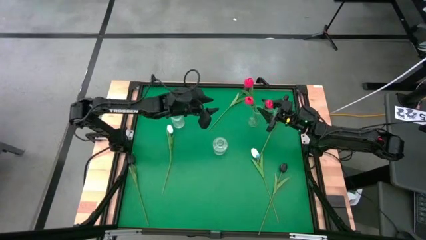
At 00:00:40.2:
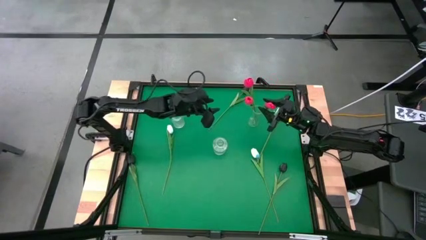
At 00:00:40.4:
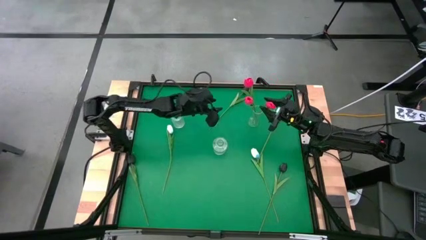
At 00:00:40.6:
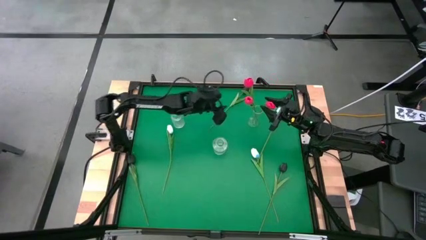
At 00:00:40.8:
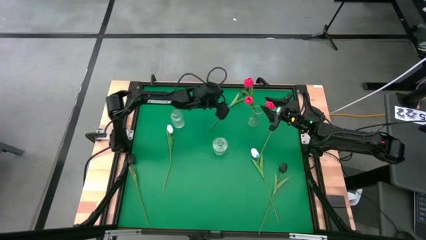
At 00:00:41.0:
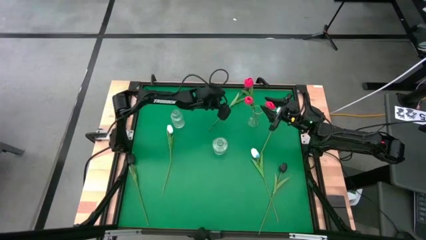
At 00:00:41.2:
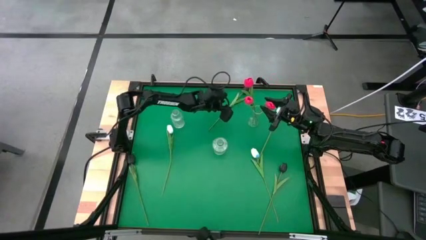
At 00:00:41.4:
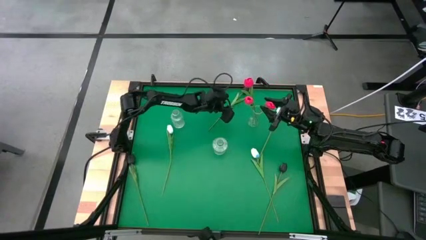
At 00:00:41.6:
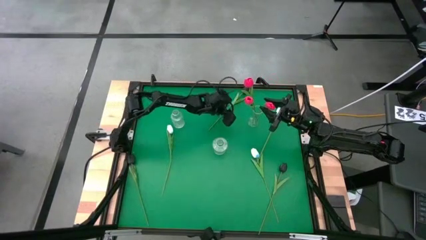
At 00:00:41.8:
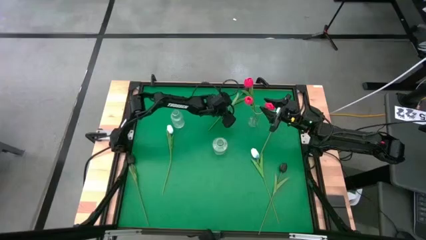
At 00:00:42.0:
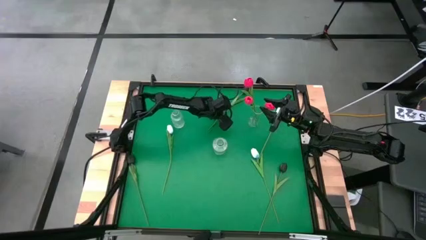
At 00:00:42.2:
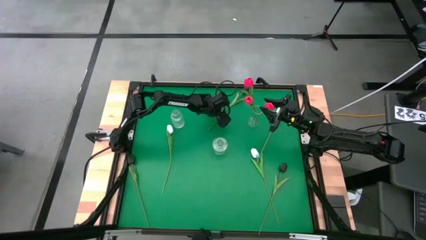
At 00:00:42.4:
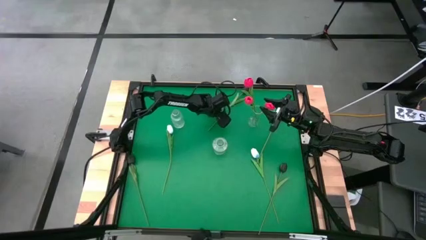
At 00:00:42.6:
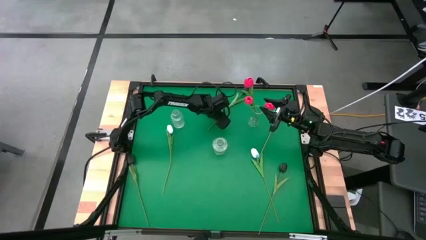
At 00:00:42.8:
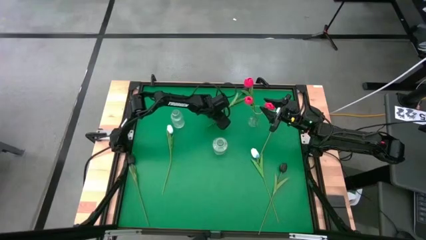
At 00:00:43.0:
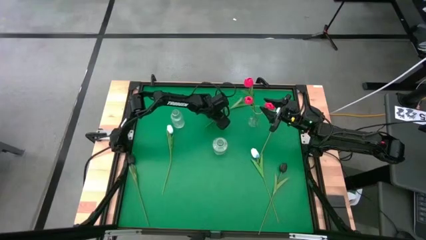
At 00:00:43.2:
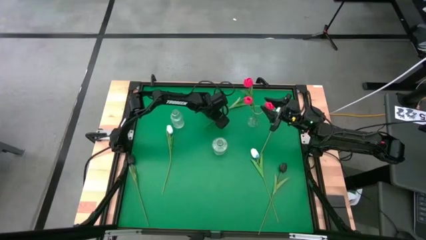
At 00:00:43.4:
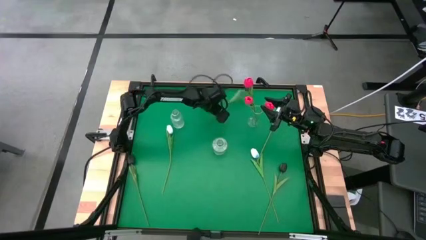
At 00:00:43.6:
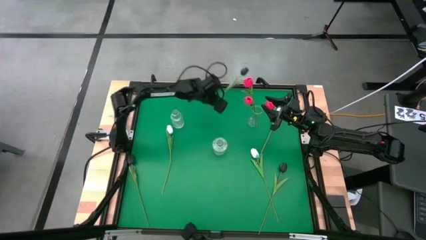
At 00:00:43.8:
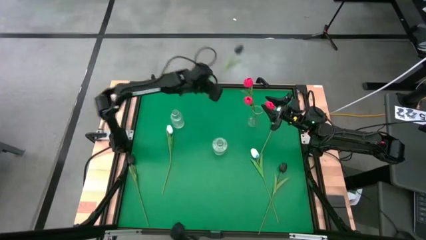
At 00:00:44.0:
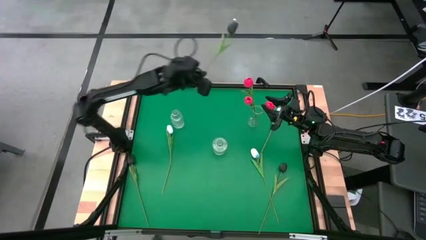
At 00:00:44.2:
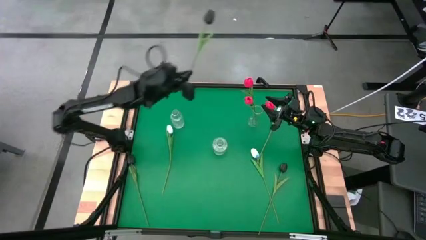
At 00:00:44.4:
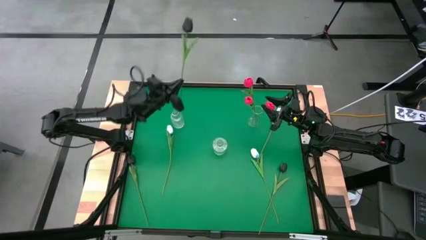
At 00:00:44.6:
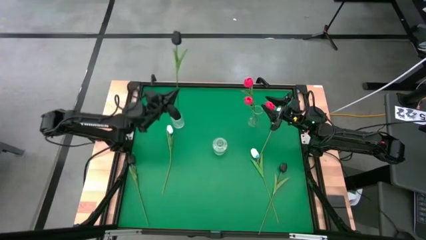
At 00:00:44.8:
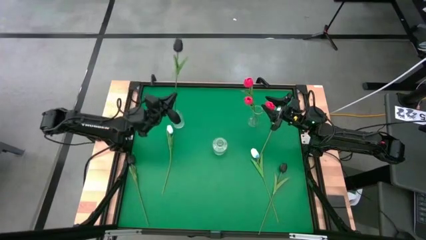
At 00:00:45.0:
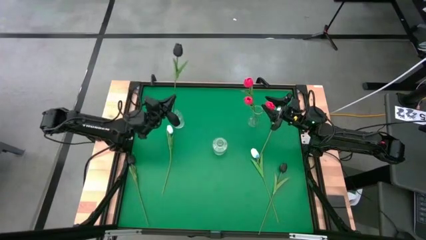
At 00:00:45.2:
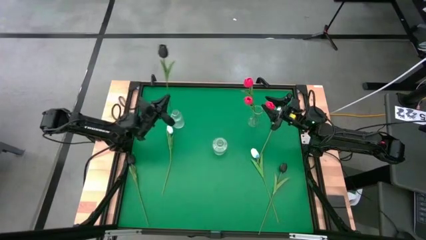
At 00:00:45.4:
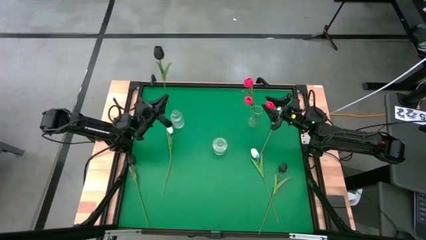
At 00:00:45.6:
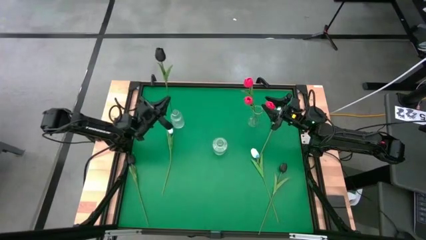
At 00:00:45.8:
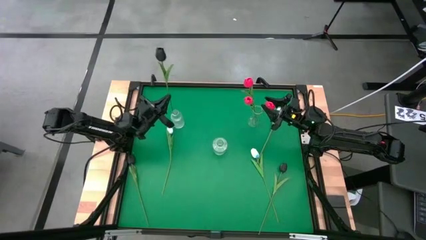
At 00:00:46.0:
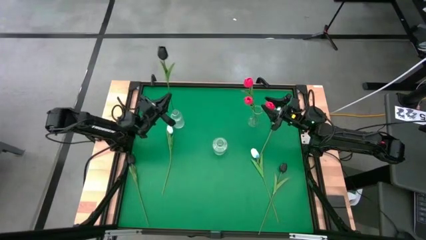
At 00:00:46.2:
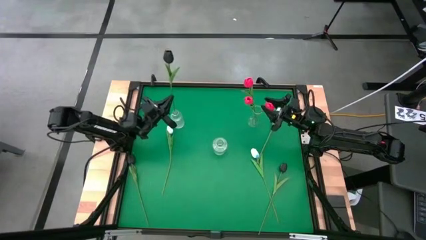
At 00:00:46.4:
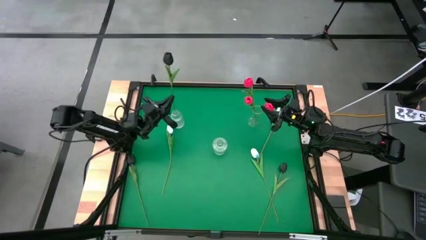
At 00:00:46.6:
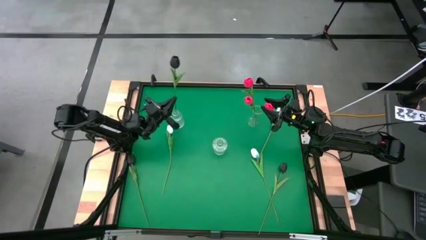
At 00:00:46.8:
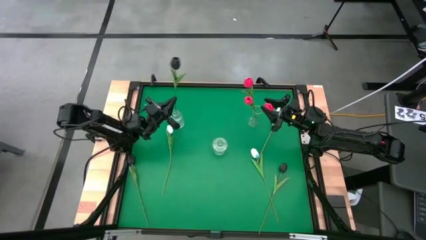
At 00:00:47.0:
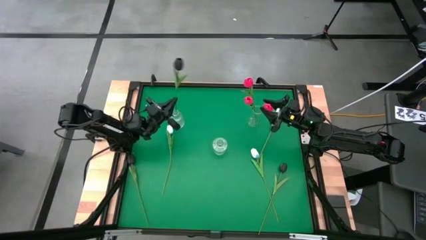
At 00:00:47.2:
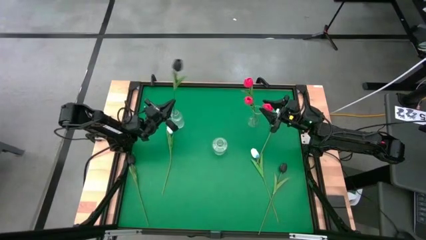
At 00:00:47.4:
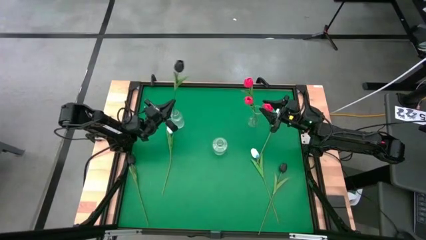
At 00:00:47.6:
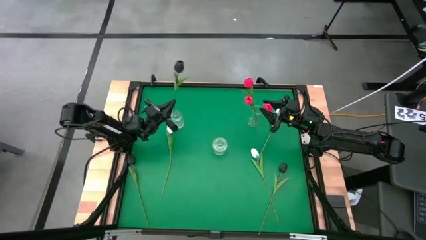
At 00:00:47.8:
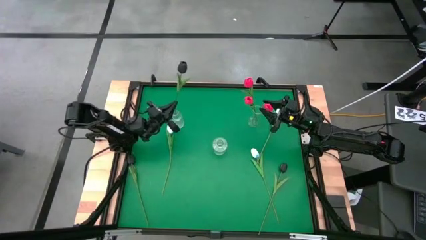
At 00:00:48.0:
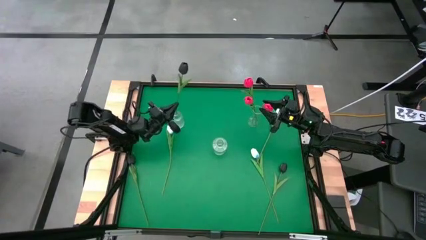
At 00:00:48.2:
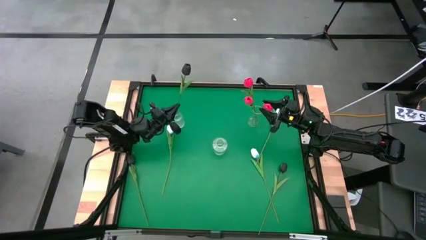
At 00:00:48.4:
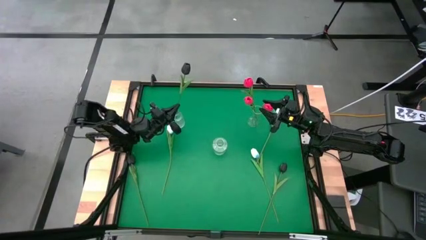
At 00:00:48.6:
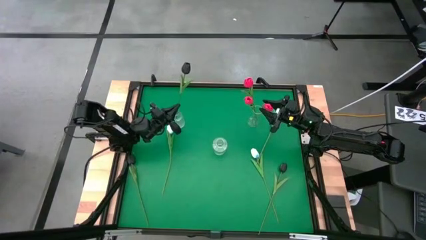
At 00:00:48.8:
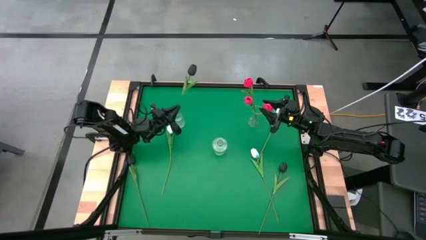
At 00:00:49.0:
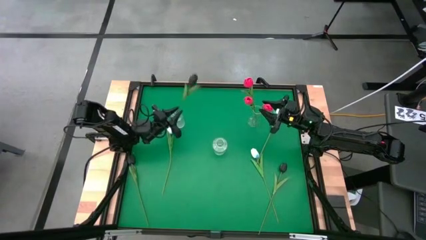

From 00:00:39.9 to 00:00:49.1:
Task: Sort flowers into vase by color
Put the top black tulip into the left transparent vase
